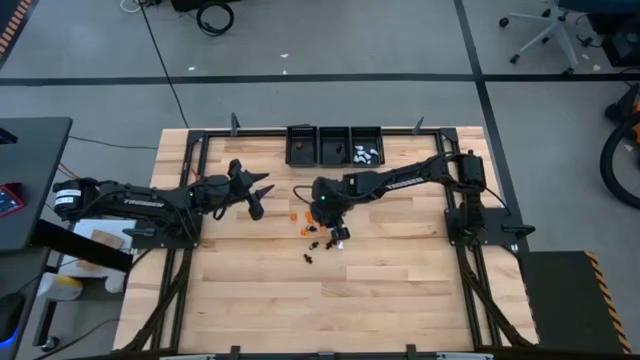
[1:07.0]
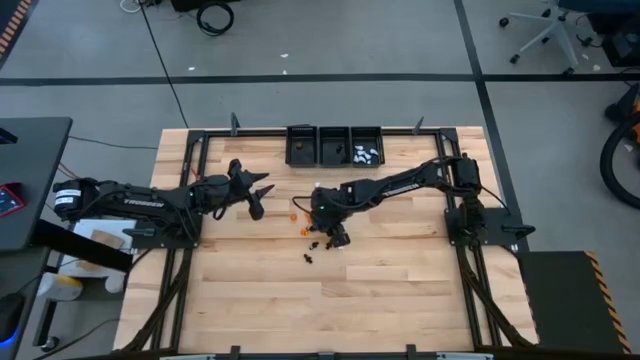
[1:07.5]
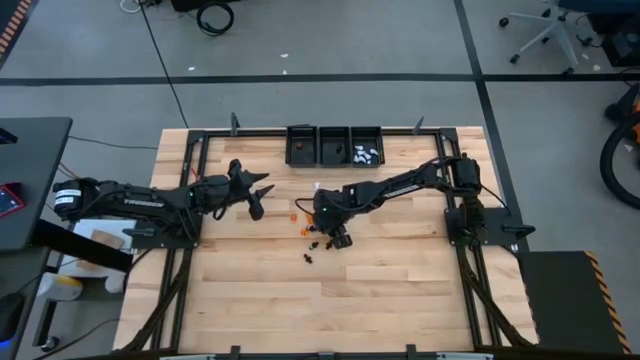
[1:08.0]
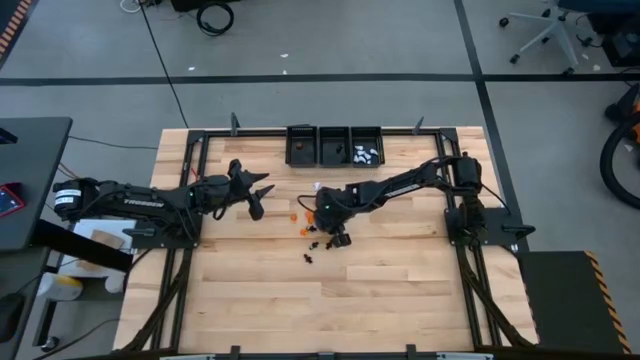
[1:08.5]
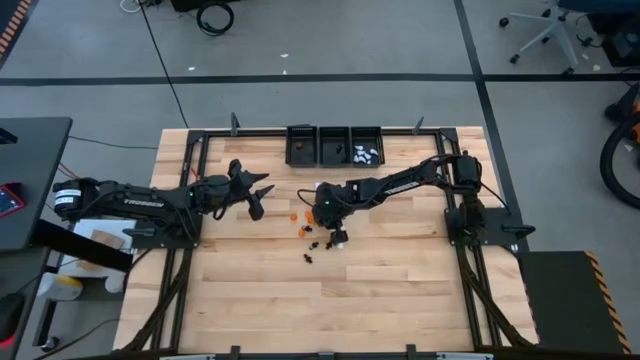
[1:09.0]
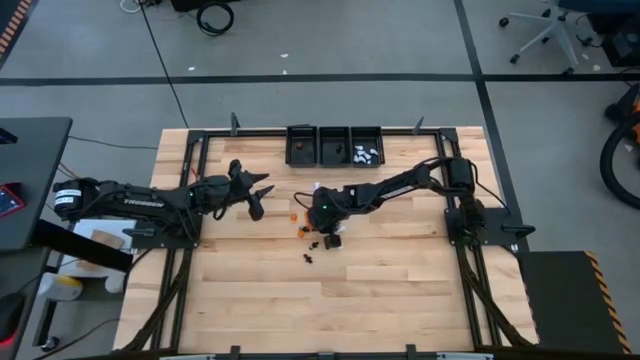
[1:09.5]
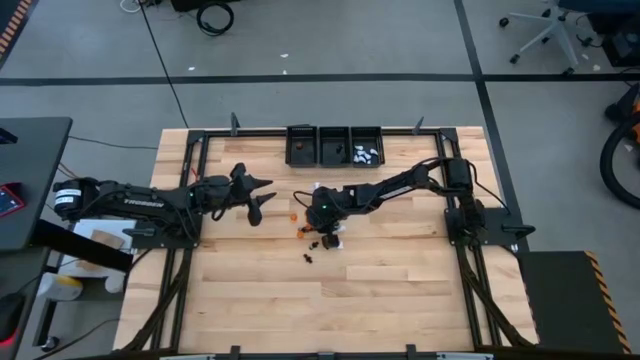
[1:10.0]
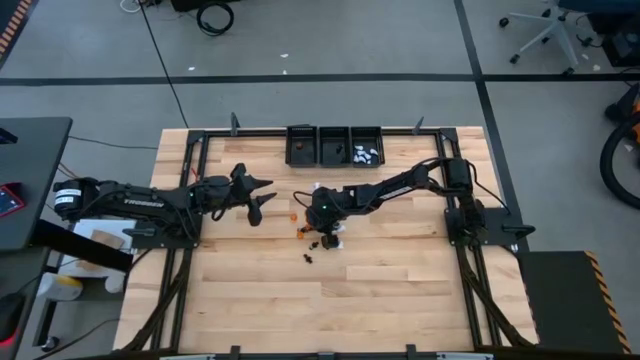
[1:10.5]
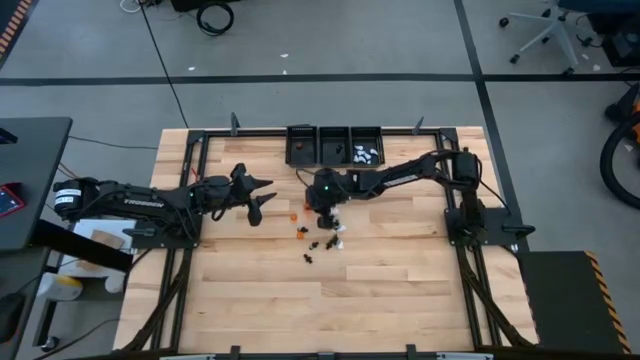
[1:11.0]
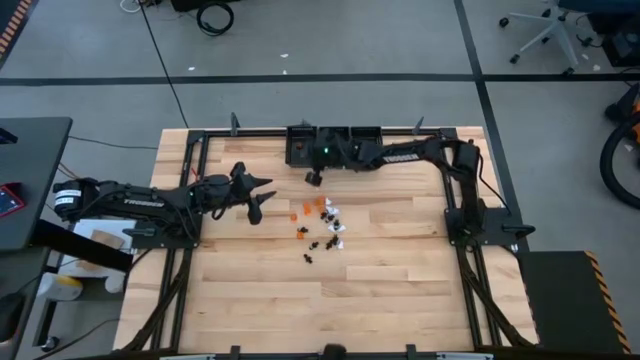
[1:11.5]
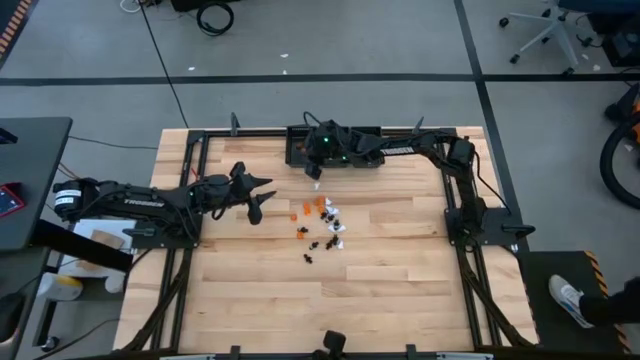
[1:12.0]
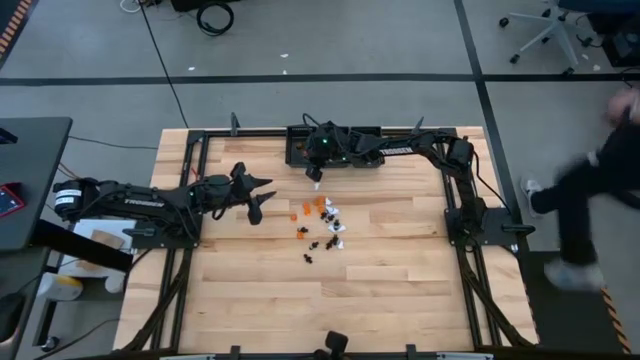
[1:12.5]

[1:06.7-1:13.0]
Task: Sort game pieces by color
Put the orange game piece into the left black basket

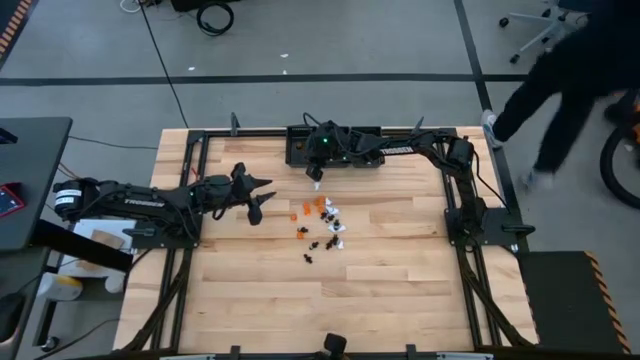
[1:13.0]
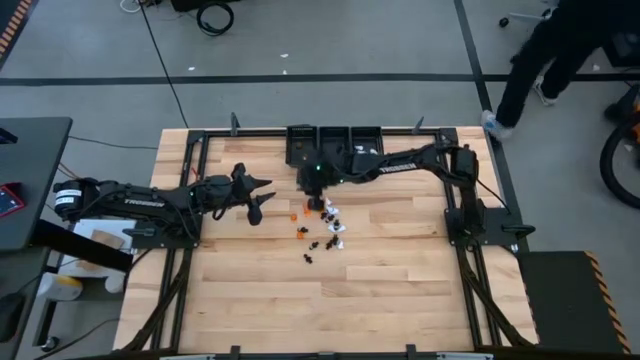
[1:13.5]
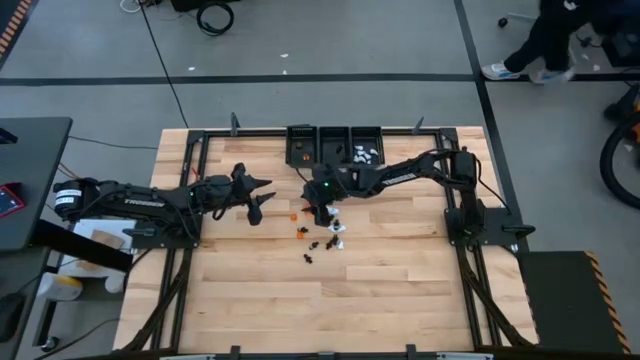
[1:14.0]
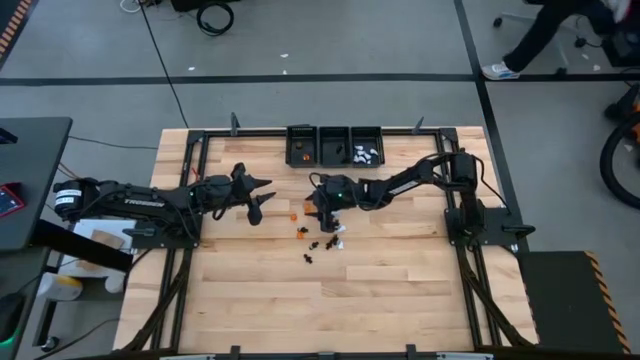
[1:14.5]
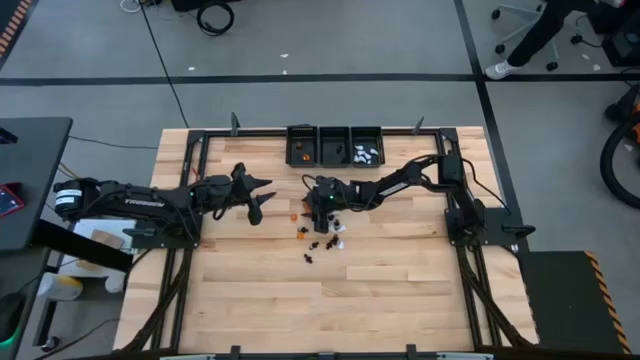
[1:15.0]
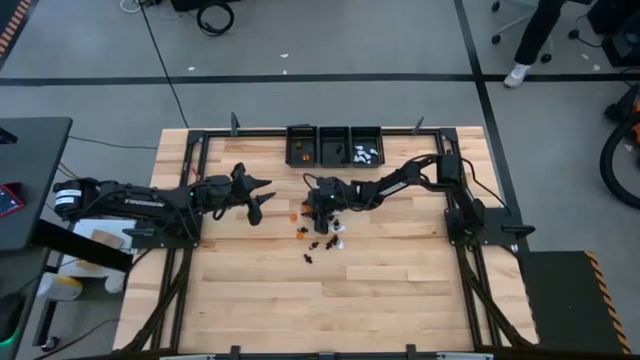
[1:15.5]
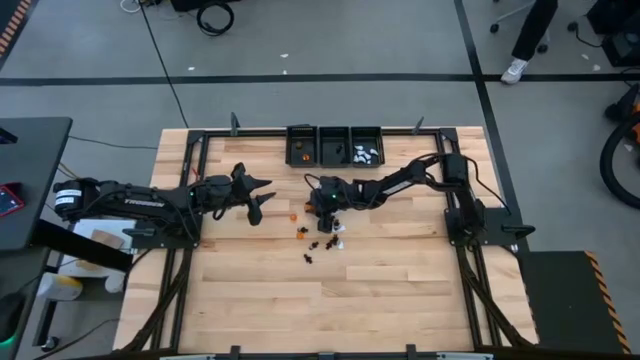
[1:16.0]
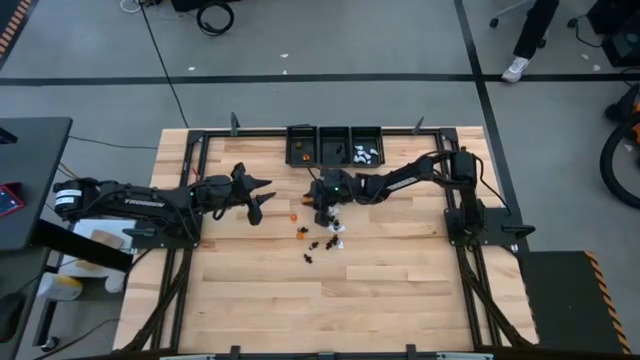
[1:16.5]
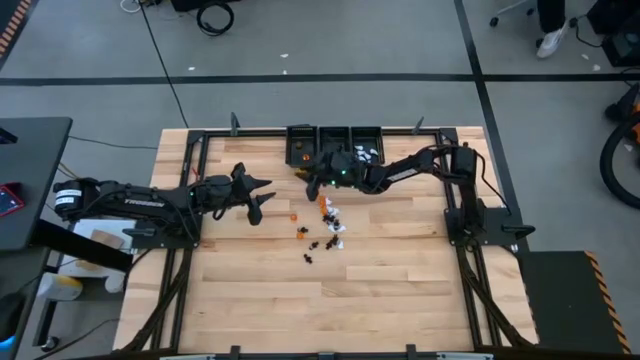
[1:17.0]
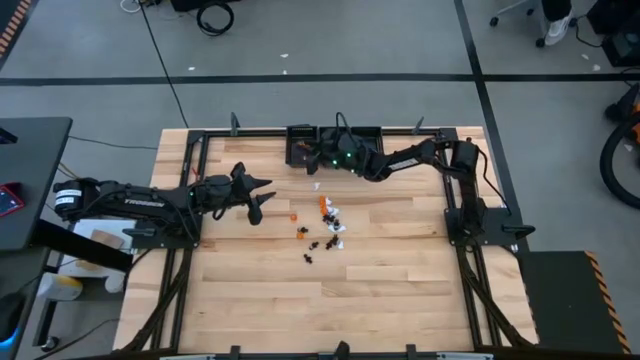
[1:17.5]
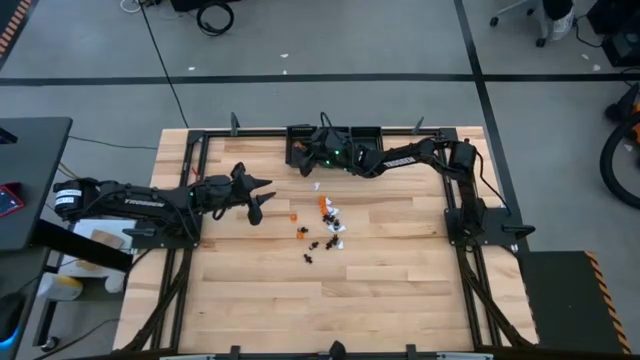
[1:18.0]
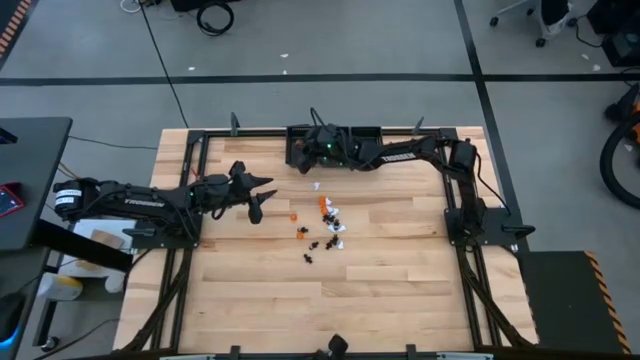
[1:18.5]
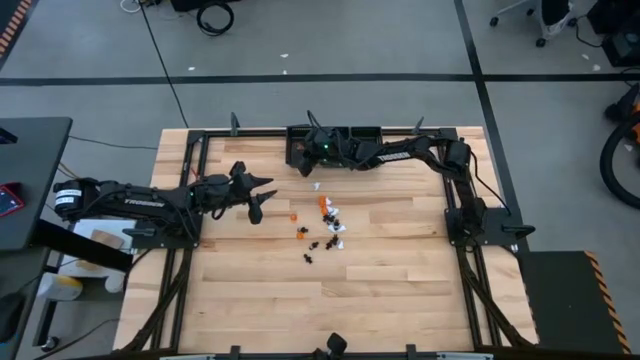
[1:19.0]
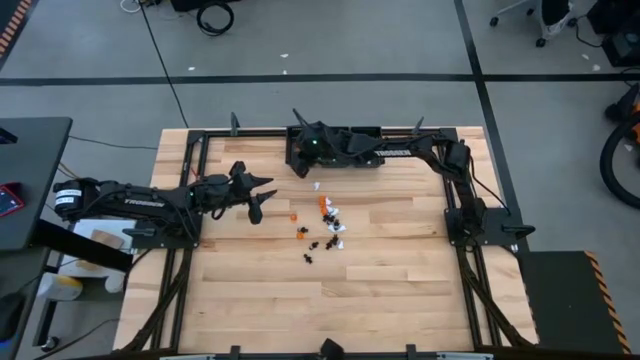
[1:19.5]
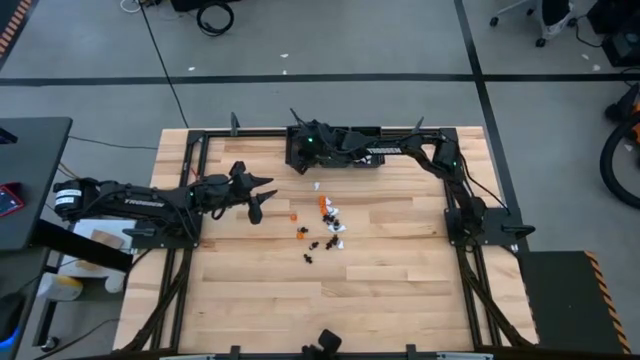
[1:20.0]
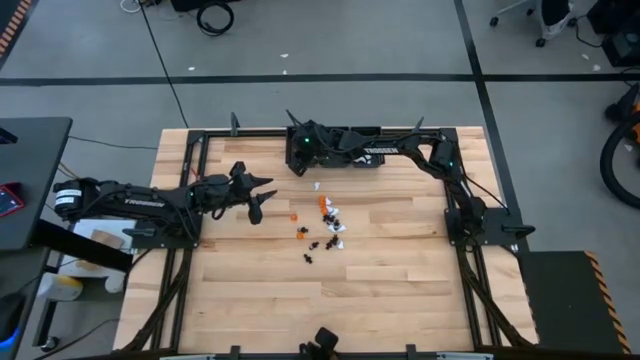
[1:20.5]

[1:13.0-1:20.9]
Put the two orange game pieces into the left black basket

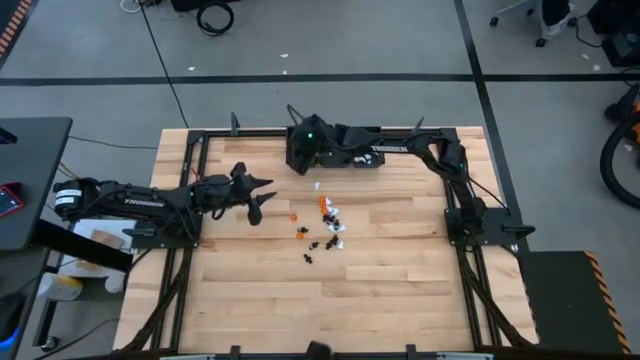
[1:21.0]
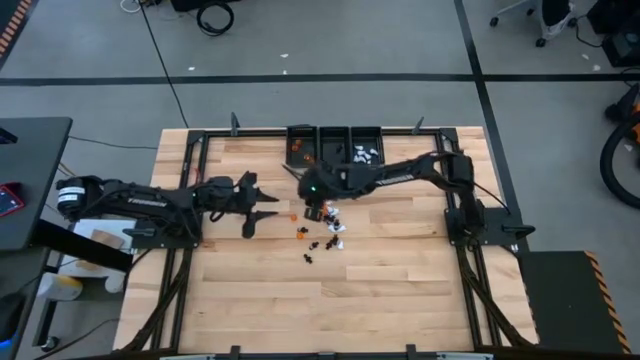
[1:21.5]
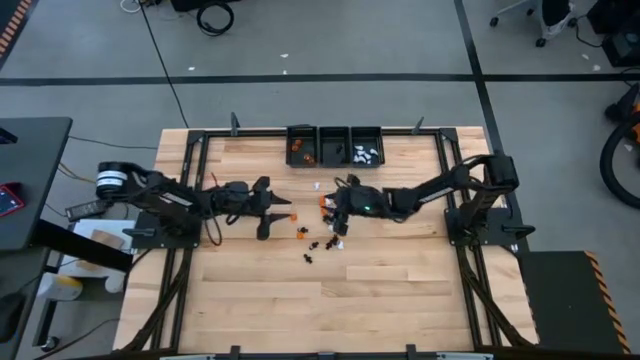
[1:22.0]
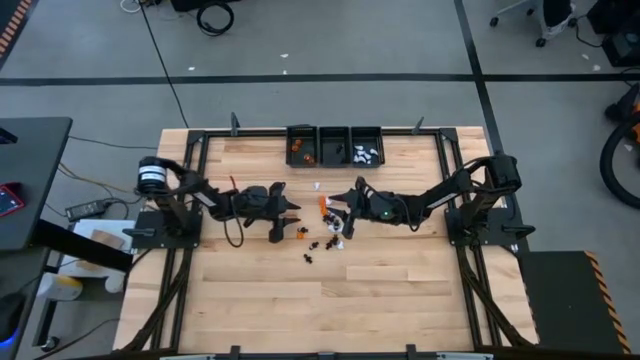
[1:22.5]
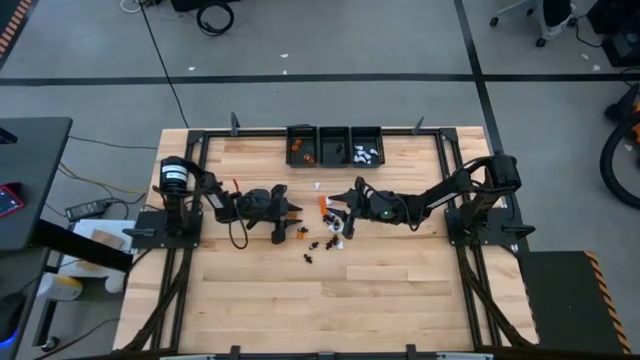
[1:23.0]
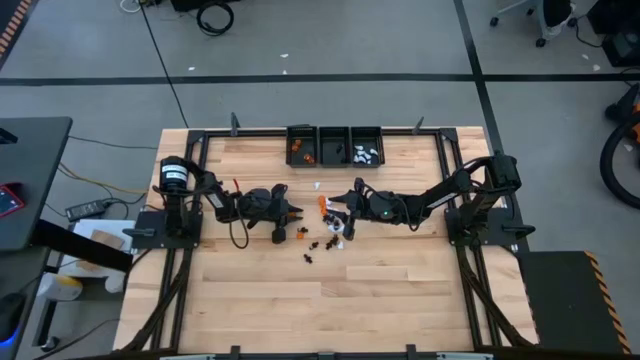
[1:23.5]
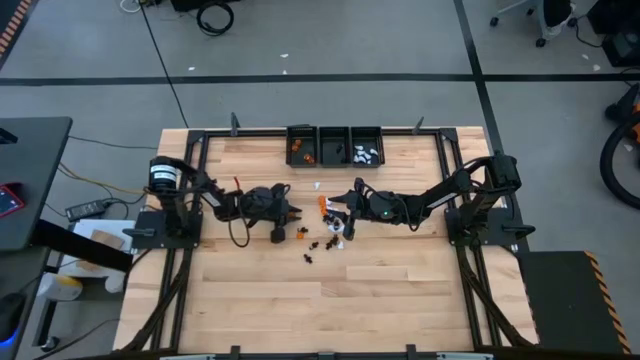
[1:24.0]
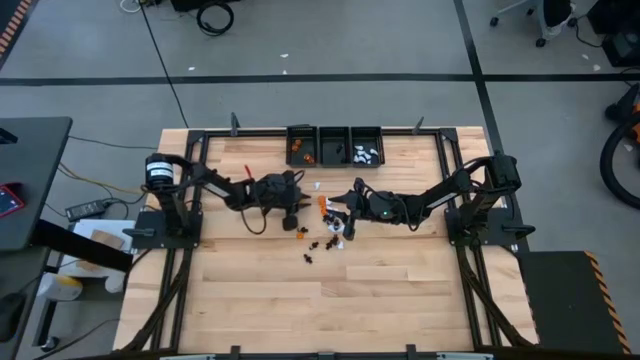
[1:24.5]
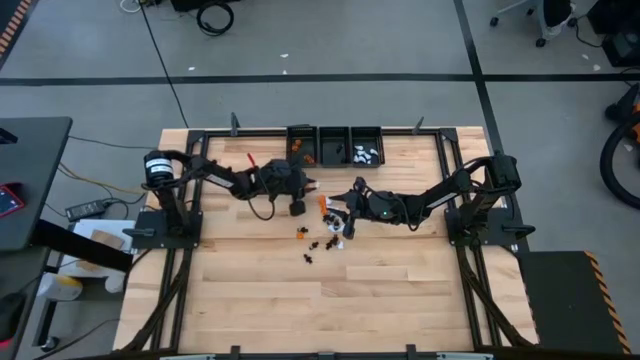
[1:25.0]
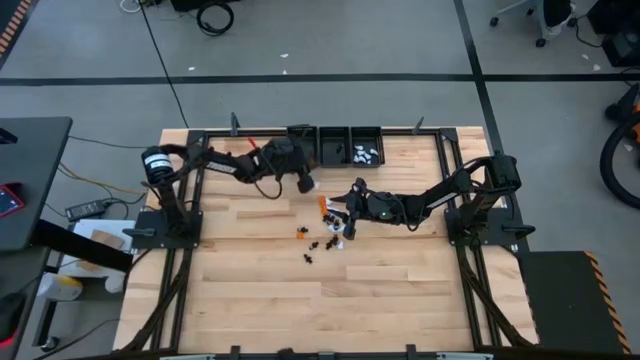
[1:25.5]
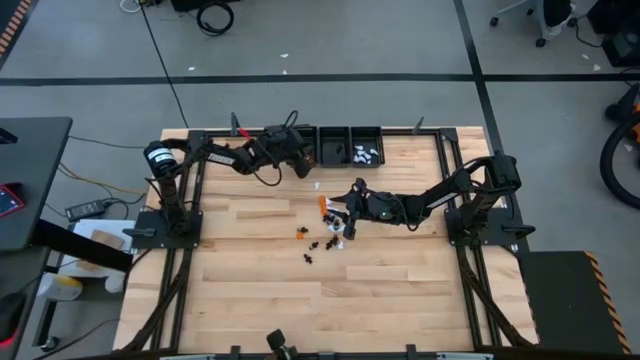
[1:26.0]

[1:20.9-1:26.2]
Put the orange game piece into the left black basket

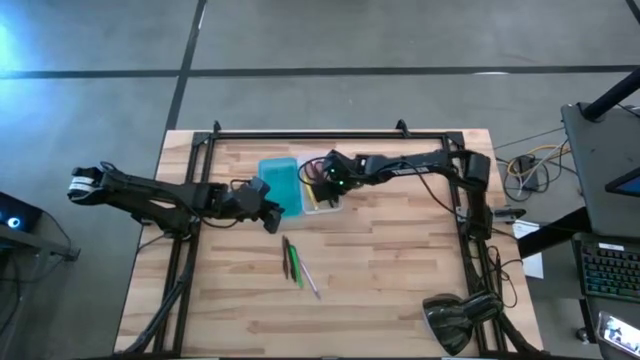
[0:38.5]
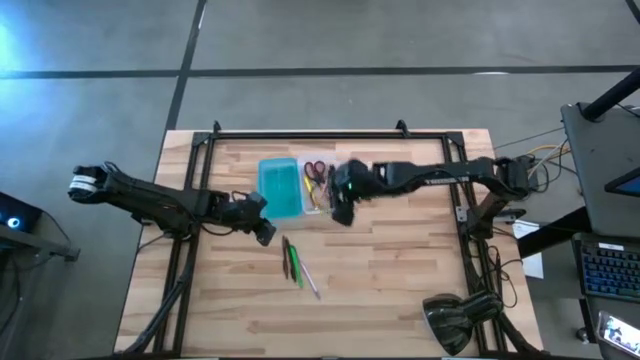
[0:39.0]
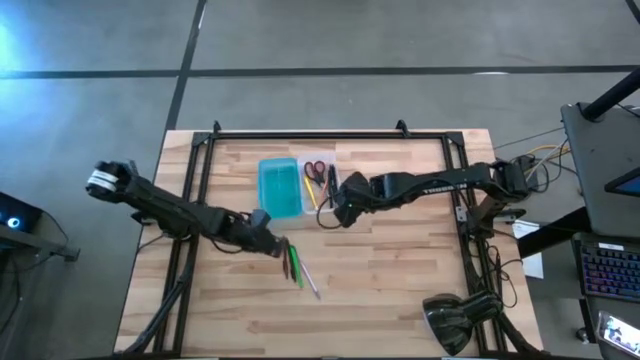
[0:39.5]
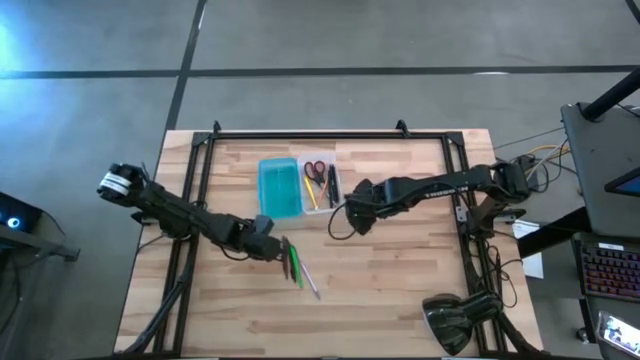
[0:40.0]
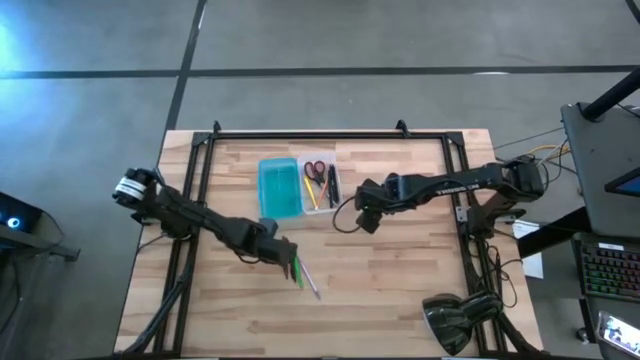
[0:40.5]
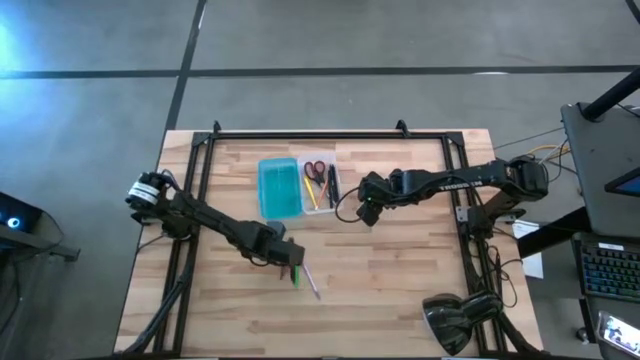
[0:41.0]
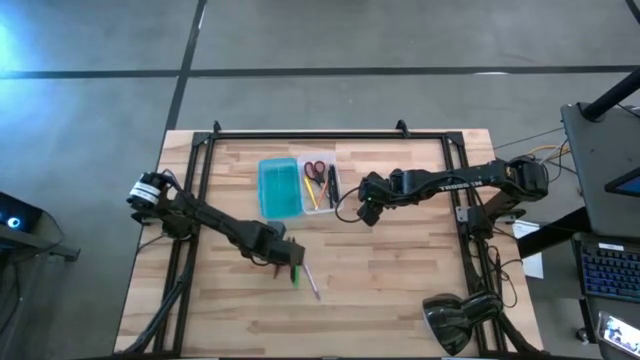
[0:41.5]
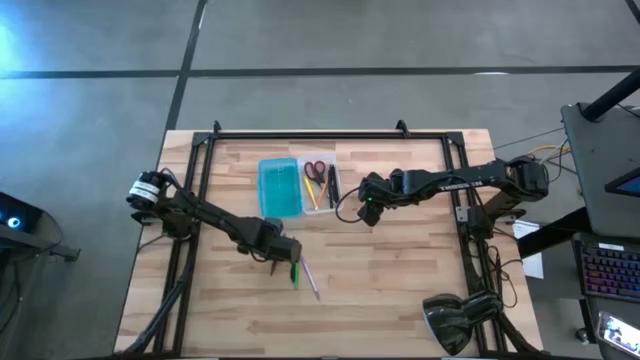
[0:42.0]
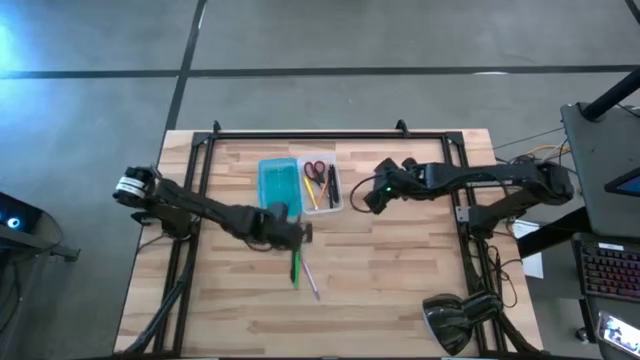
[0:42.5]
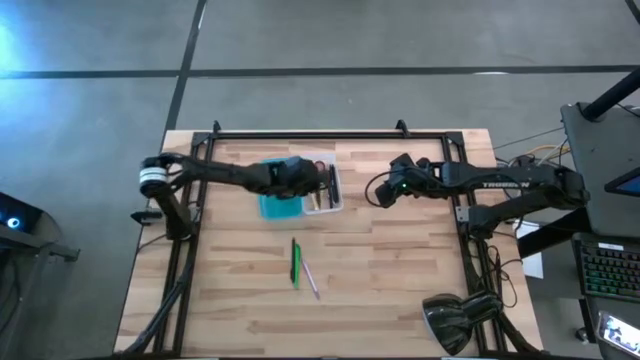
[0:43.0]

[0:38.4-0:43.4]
Task: Pick & place school supplies into a supply box
Put the brown pen into the pencil box
